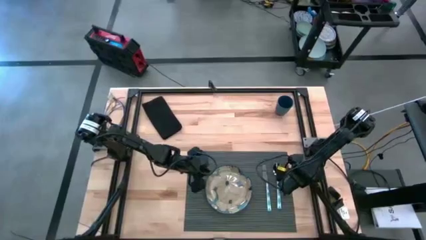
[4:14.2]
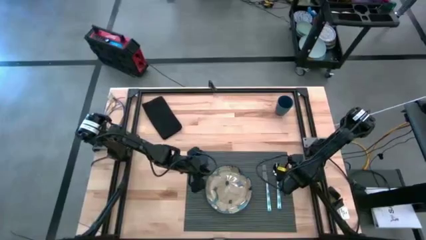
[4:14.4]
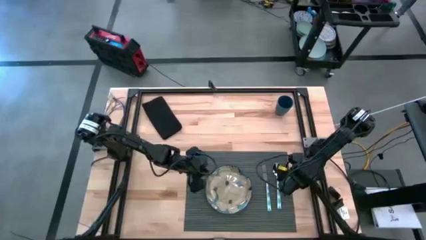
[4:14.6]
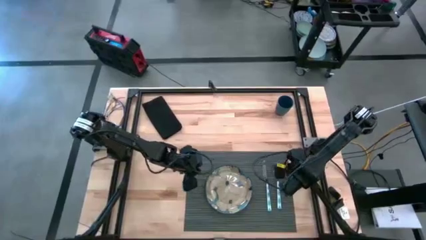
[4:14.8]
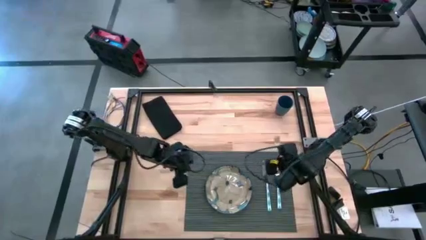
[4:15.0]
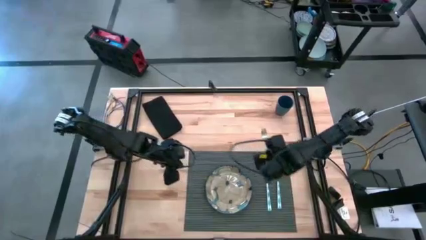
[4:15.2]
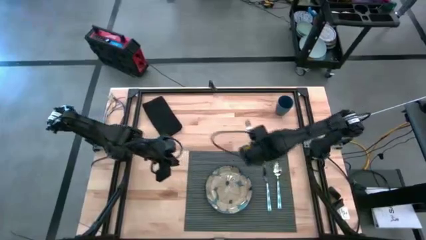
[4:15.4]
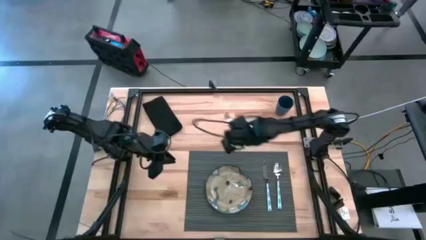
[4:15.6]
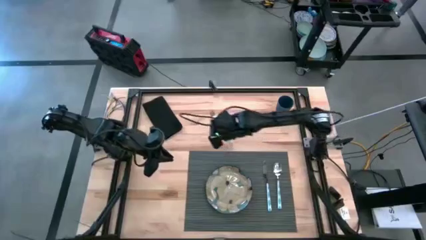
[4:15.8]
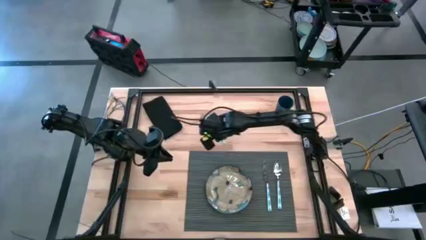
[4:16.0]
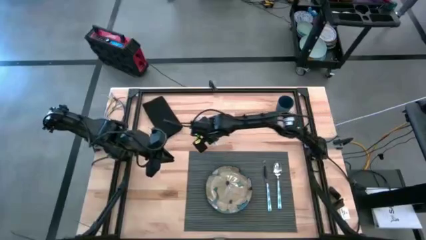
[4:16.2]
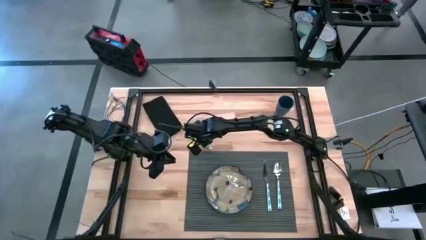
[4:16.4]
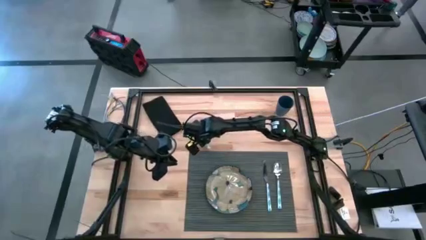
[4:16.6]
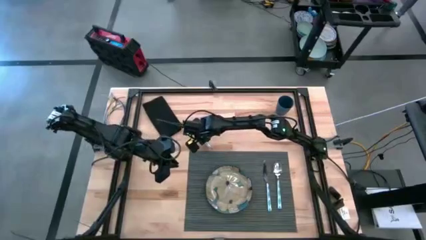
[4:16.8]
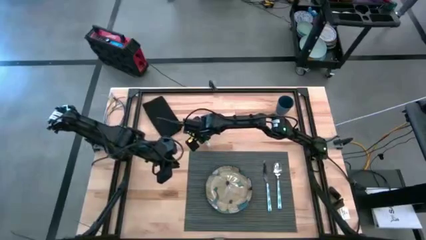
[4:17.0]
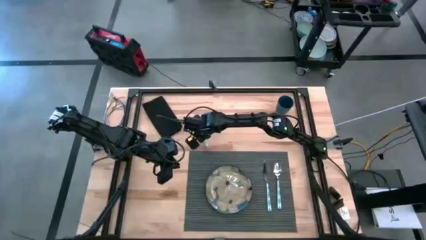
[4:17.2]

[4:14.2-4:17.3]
Task: Set table place
Move the blue fork to the top left of the table

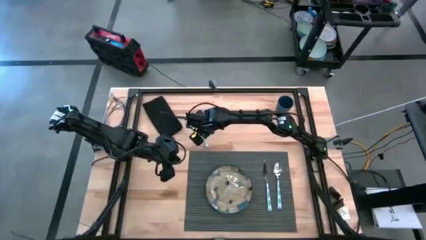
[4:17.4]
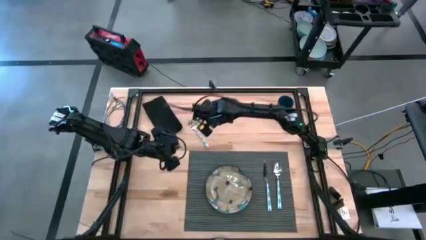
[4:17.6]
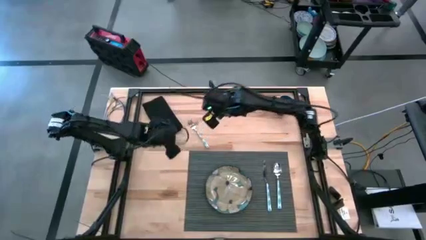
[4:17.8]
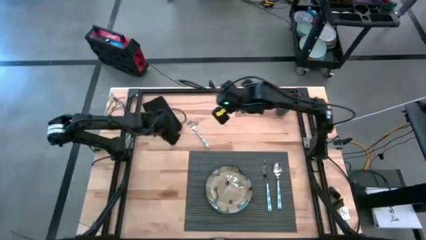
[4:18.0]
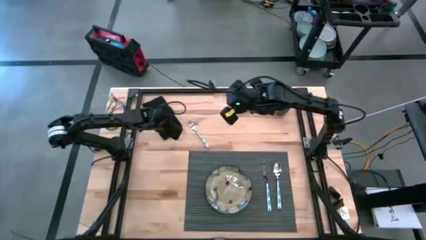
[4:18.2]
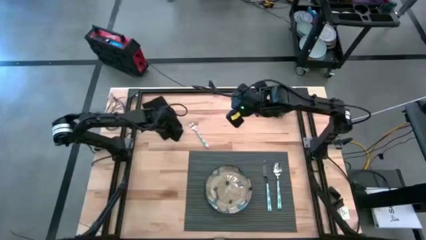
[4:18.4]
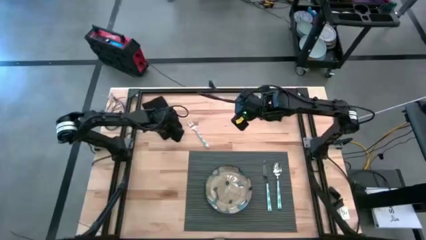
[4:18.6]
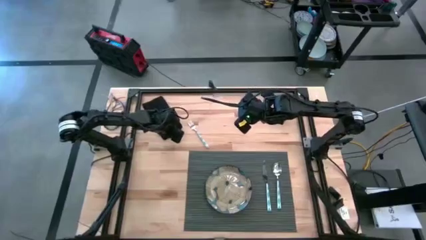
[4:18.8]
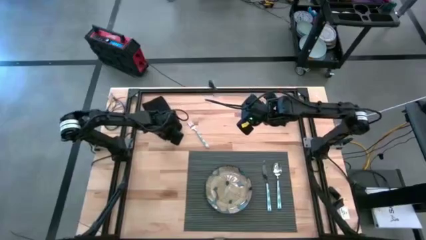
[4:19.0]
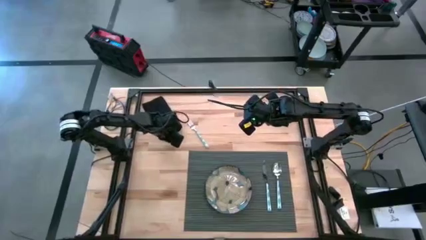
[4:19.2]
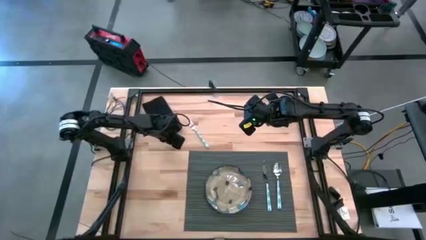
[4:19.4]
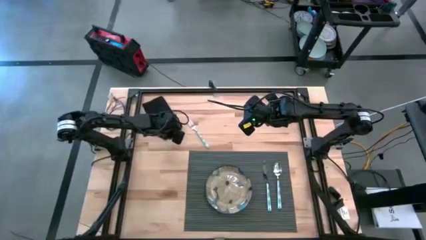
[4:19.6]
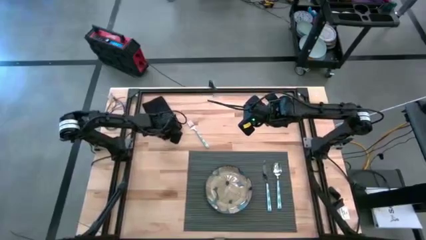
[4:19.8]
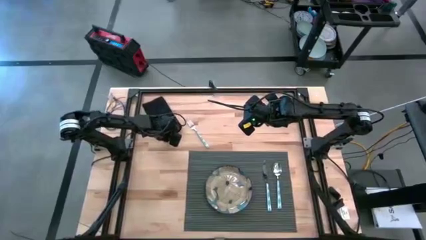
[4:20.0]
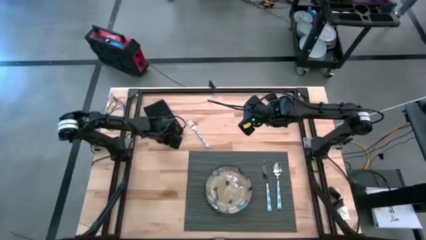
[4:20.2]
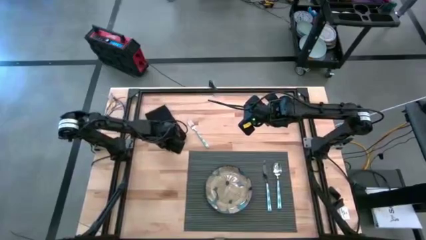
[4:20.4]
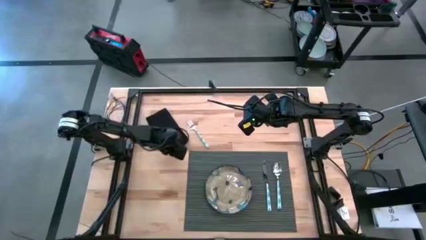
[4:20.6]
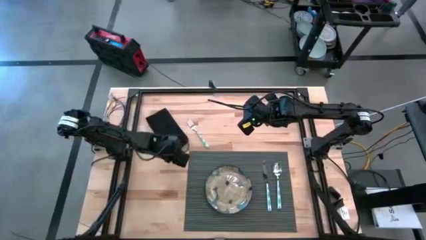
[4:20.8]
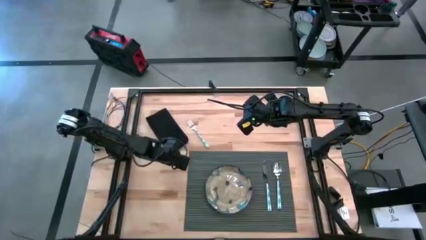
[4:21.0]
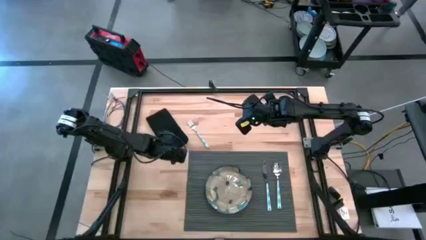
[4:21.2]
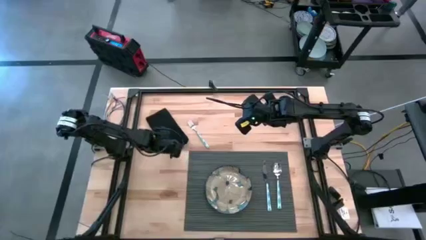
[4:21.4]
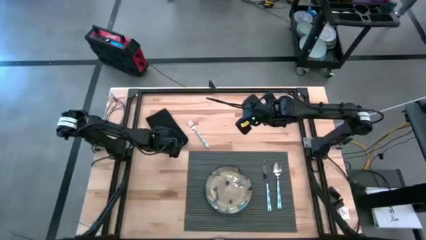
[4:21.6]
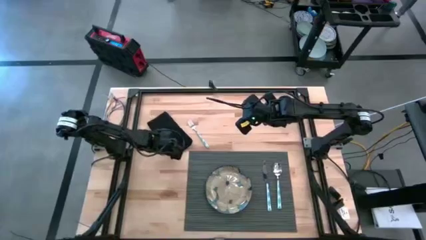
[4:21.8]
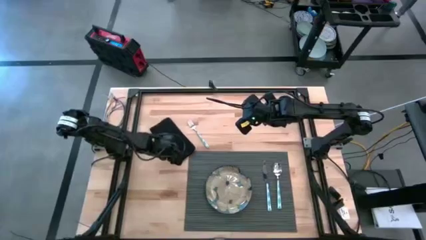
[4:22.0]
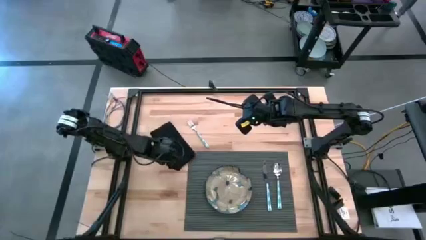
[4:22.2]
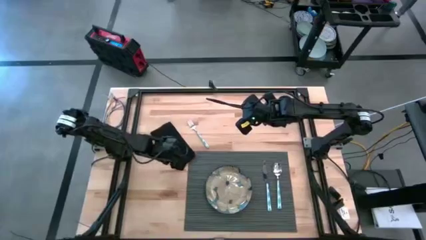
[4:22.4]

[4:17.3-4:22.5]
Adjust the folded black napkin on the table

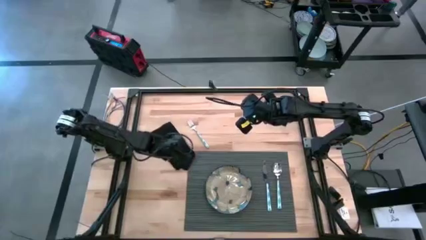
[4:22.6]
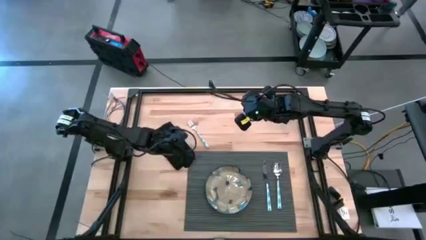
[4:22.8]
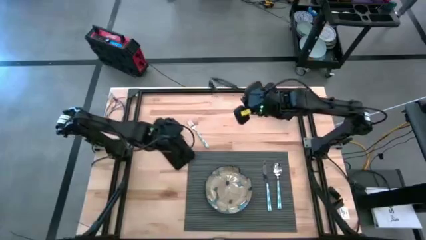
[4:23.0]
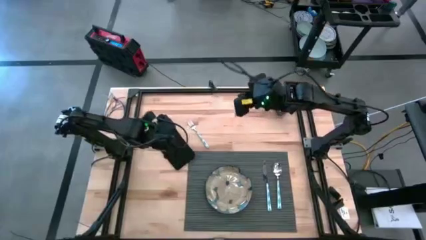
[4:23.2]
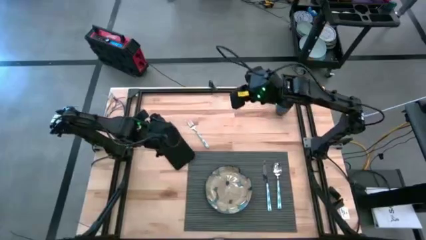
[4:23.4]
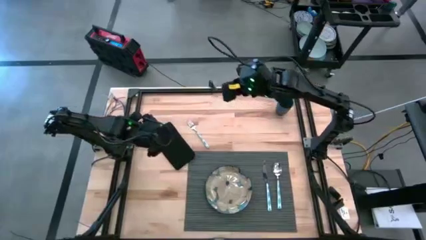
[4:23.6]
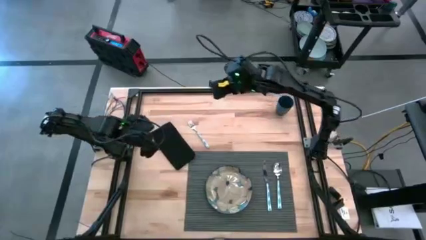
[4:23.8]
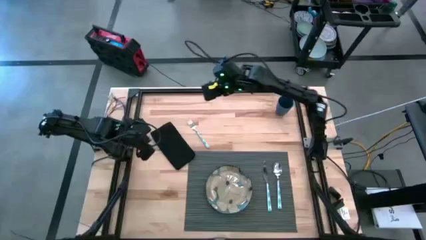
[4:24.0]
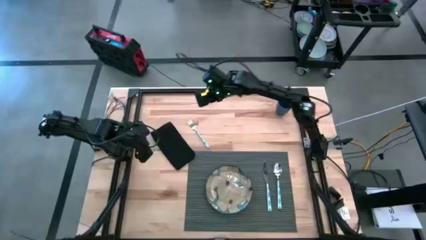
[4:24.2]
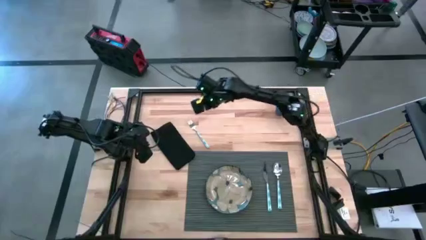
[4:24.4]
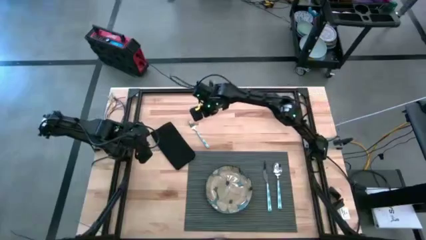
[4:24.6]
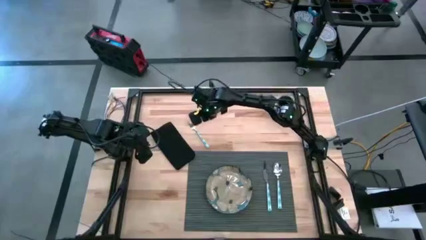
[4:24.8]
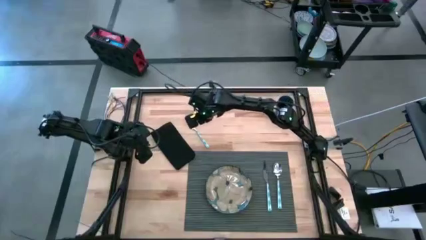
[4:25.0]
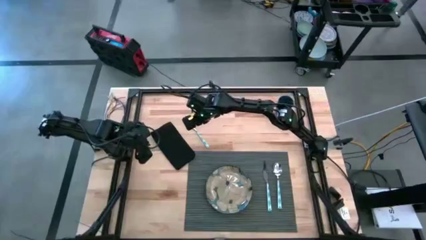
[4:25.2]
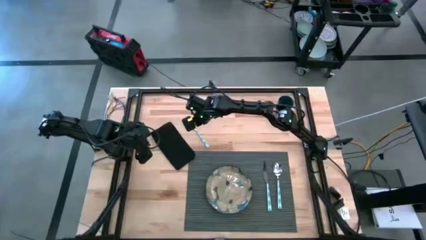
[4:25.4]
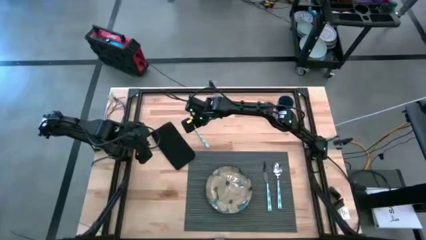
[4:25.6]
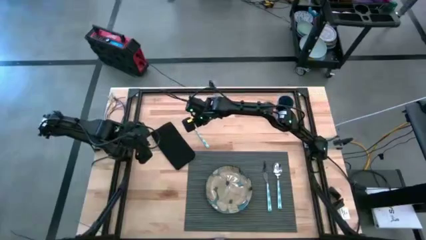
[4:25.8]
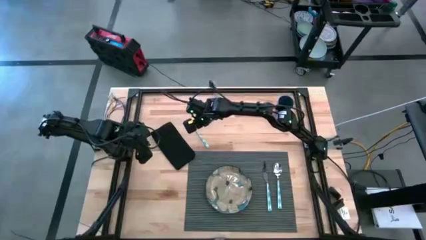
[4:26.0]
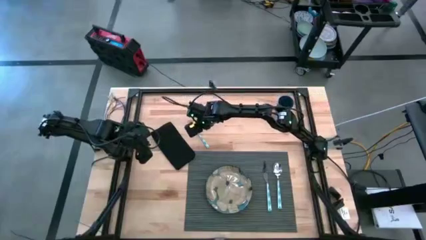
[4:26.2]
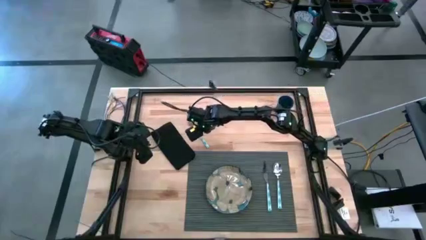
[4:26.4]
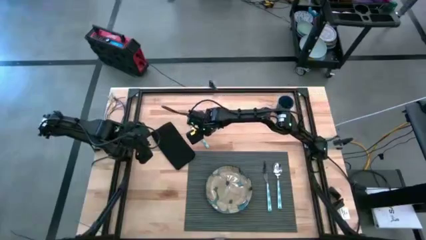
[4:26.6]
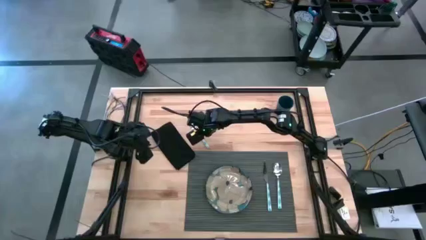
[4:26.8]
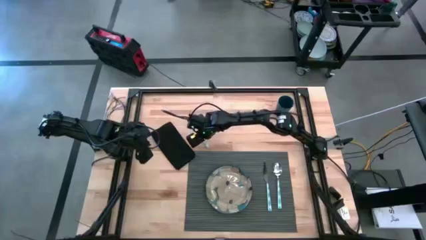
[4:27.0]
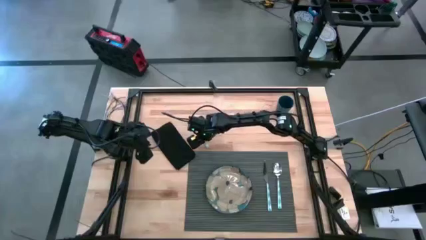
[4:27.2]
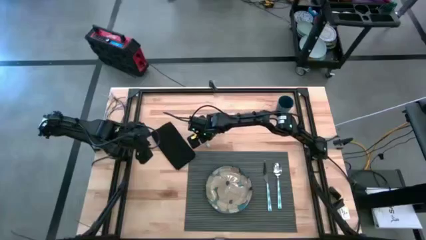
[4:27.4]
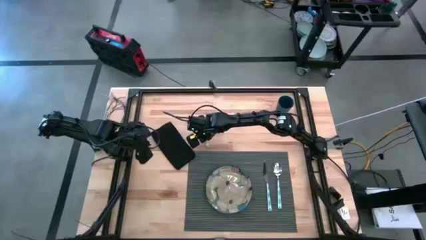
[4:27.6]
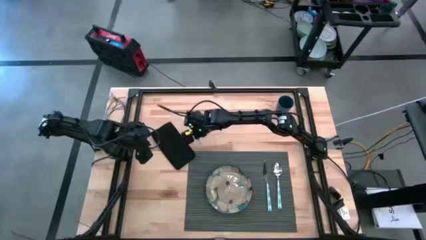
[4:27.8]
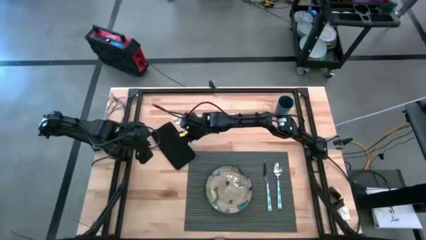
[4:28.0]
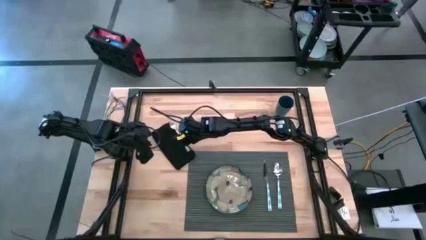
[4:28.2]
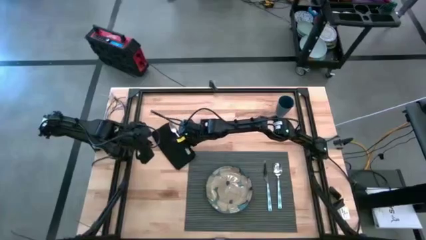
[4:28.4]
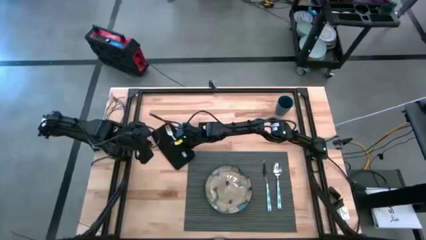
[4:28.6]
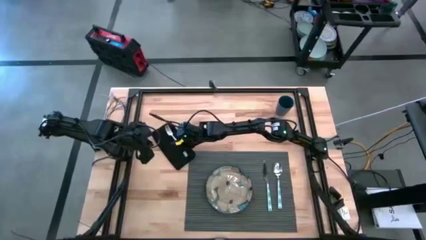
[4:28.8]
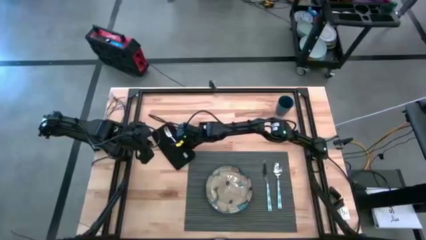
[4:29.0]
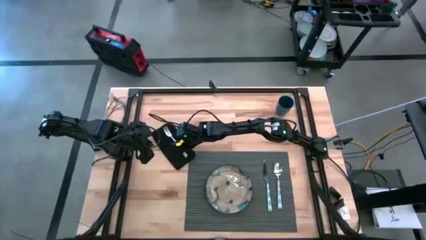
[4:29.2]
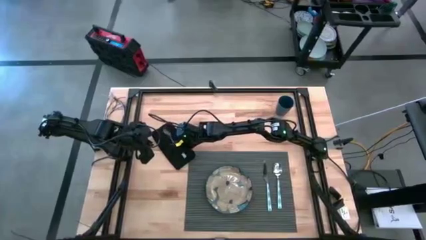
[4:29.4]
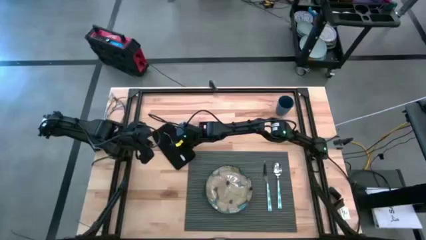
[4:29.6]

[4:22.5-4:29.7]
Put the blue fork on the folded black napkin

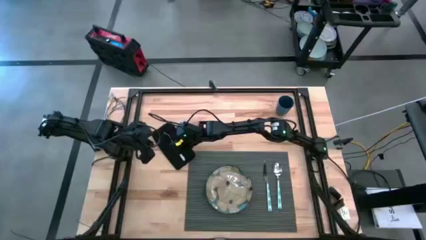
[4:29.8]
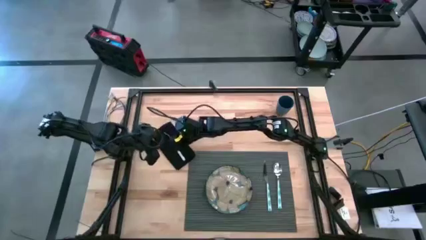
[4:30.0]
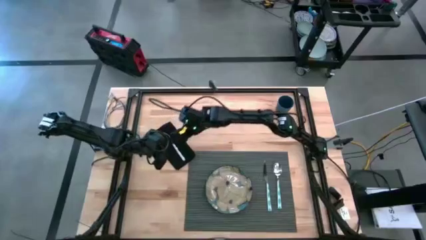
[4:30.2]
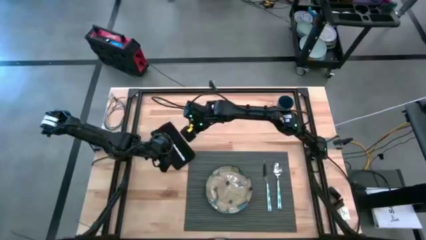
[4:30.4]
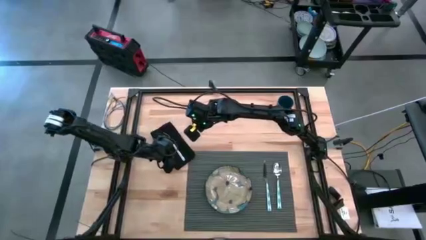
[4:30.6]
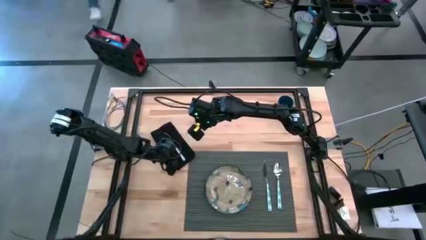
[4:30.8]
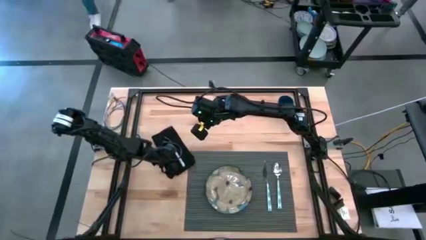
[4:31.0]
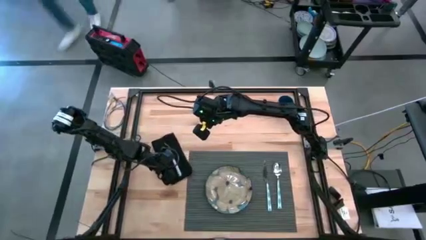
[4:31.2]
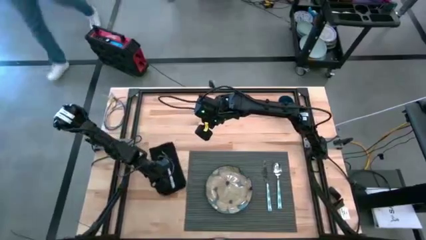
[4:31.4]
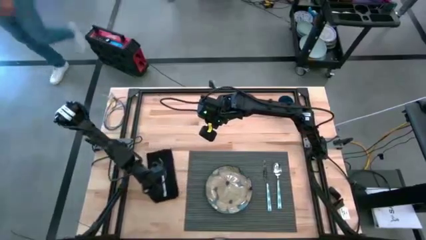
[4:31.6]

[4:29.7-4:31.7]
Adjust the folded black napkin on the table
